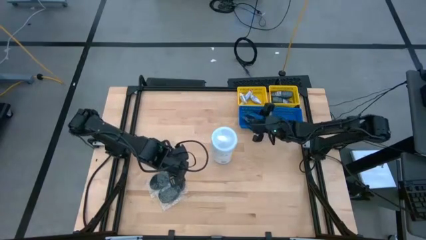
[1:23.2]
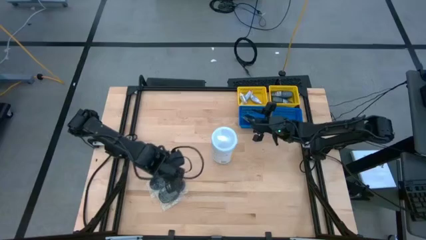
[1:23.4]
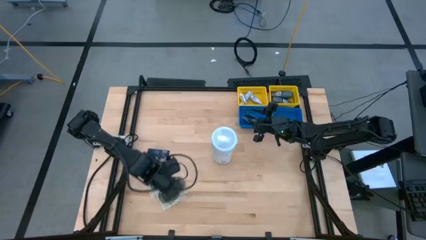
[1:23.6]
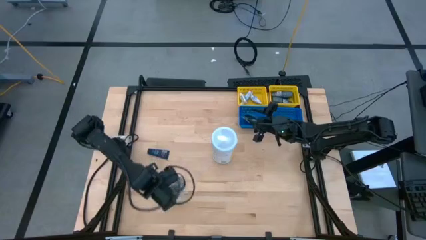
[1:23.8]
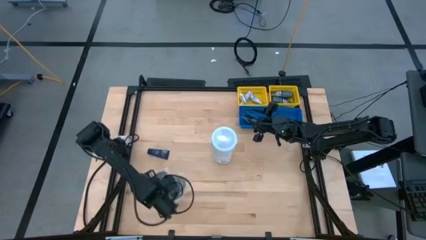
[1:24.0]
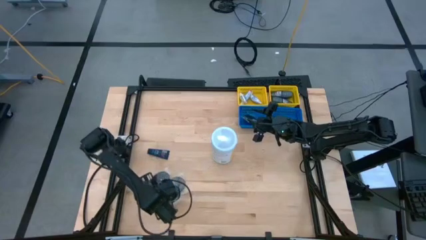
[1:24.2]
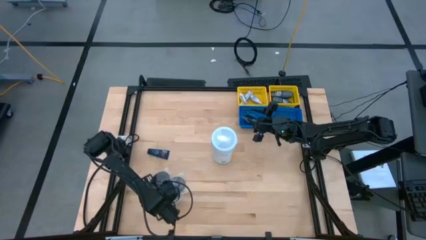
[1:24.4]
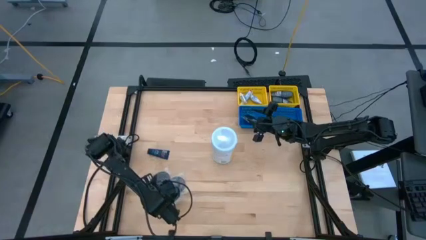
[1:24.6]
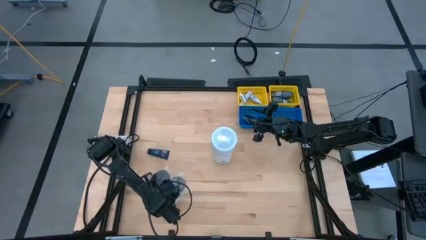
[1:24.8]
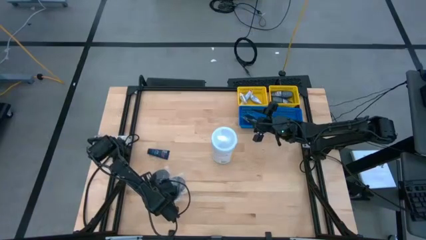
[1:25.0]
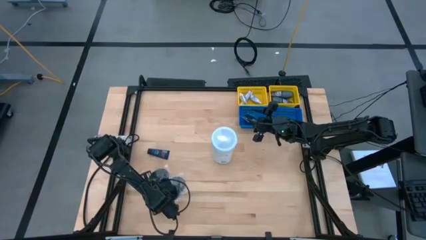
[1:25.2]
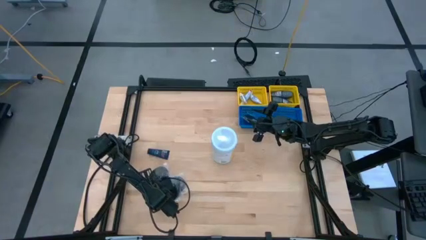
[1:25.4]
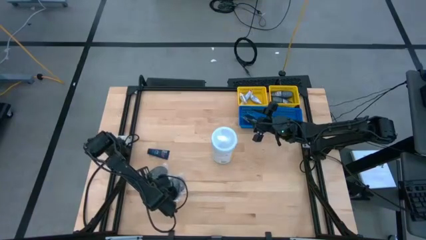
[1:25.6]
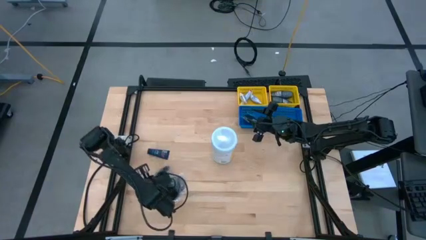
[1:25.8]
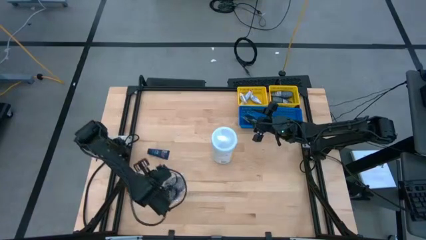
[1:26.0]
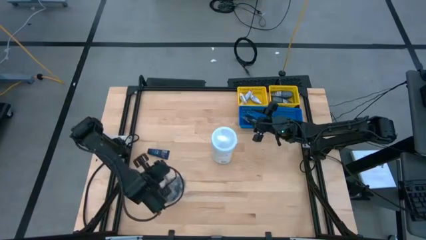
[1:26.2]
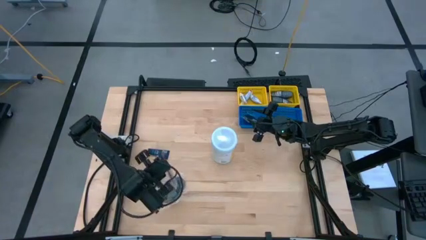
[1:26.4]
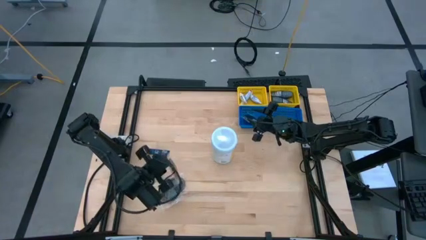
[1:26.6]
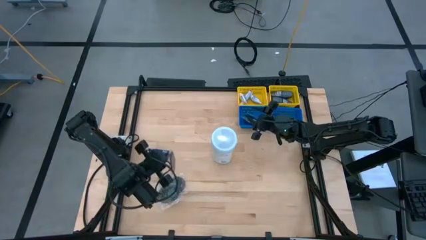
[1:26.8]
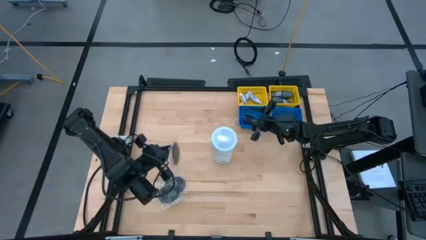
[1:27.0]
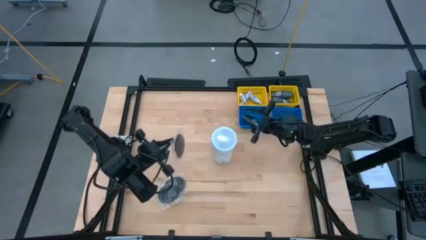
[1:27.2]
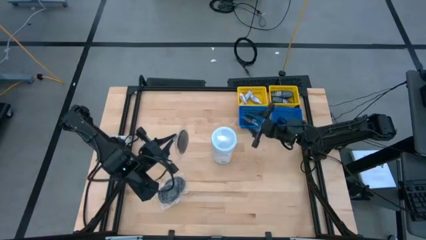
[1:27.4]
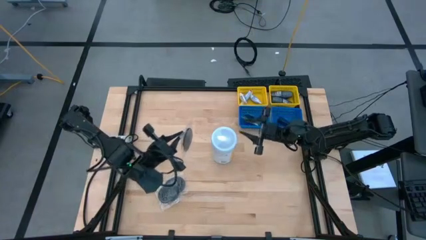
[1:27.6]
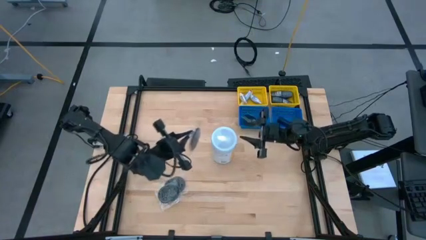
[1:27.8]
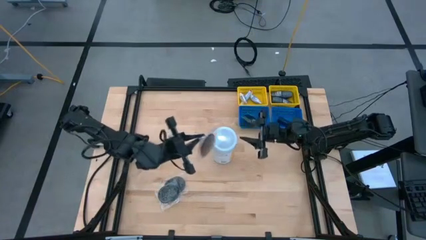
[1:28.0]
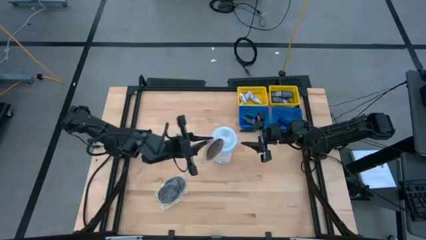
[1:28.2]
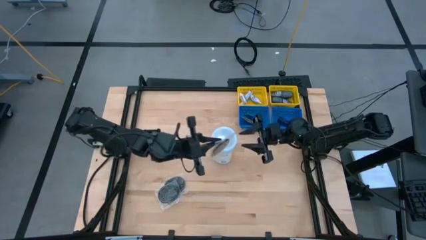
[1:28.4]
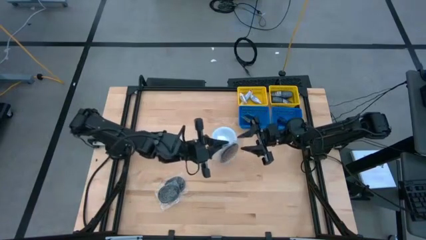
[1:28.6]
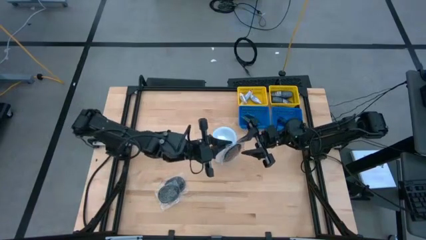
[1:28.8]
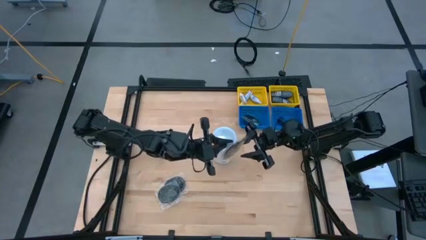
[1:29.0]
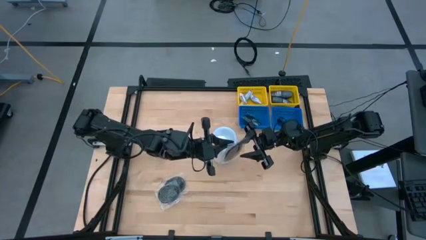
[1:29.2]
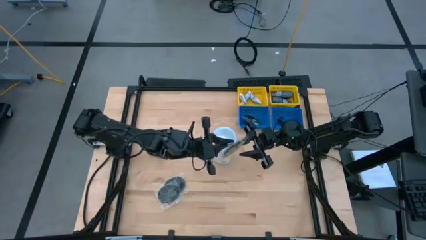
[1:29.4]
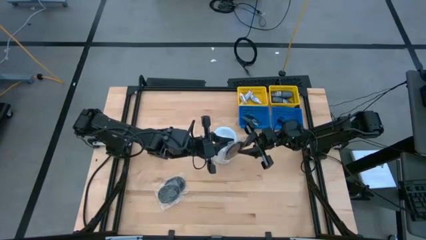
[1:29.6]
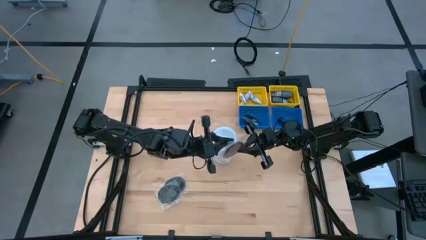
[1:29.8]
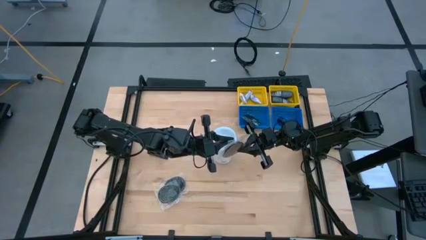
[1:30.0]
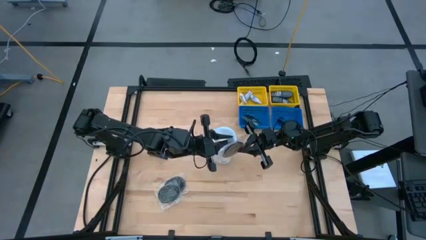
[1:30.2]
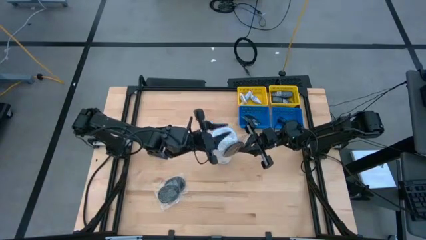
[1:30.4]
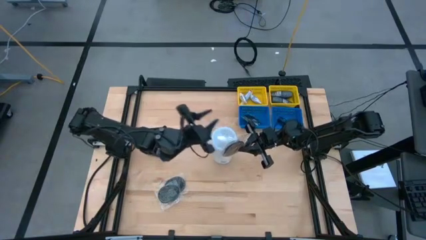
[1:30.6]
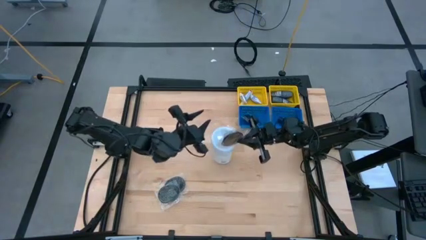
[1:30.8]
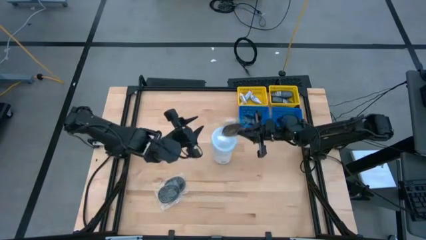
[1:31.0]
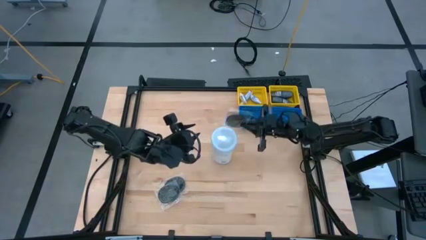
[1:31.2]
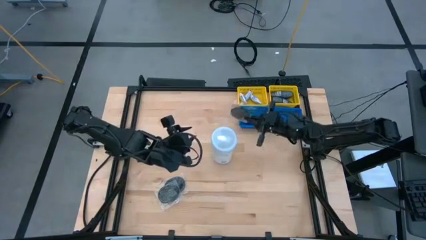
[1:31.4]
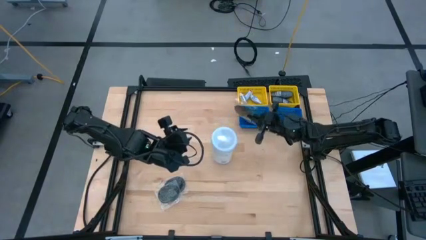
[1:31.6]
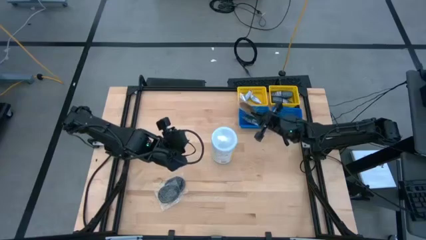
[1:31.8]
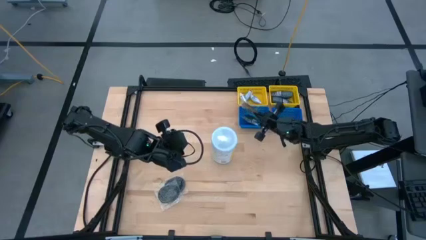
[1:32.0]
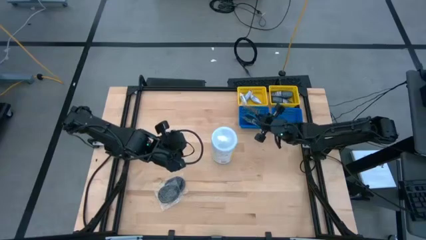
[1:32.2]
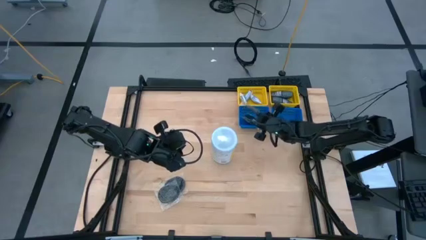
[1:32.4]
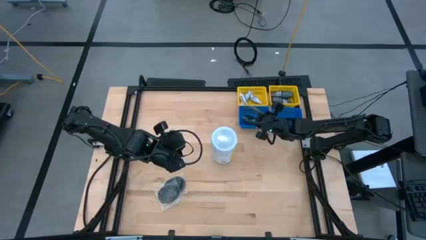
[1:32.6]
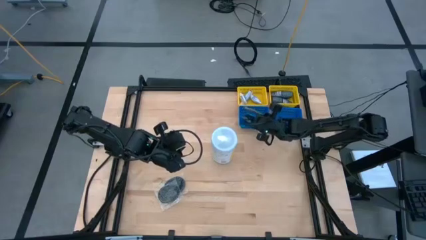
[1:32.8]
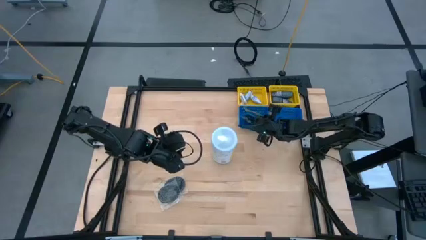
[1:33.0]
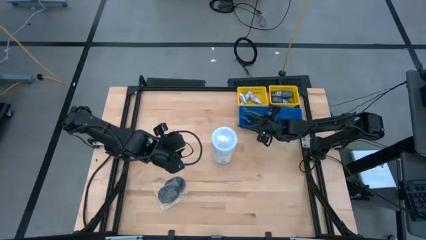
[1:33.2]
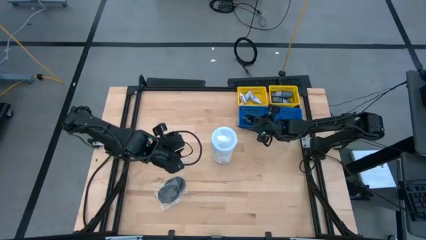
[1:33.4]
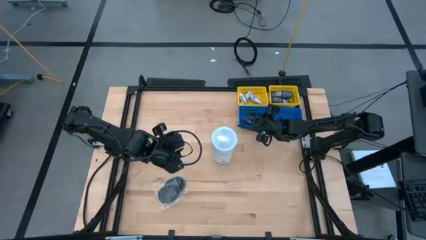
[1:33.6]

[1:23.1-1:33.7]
Task: Pick & Place Travel size toiletries
Put the black hair brush into the left blue bin

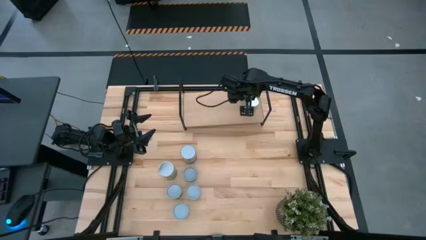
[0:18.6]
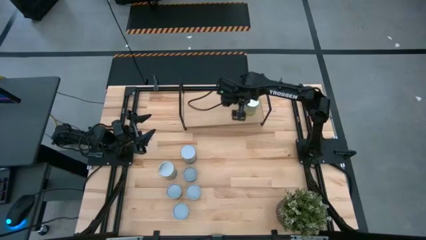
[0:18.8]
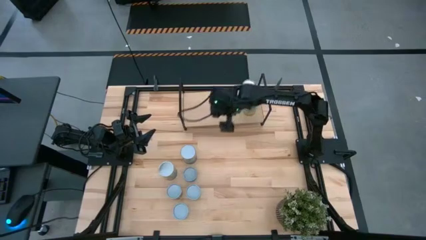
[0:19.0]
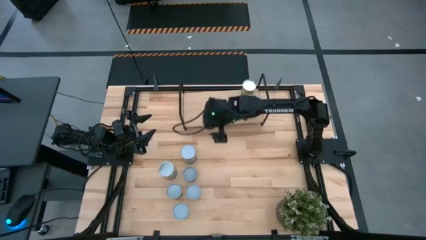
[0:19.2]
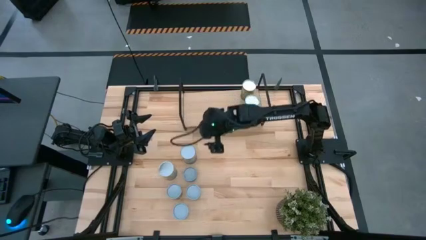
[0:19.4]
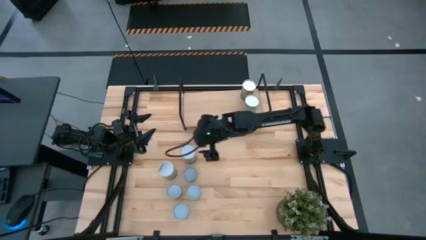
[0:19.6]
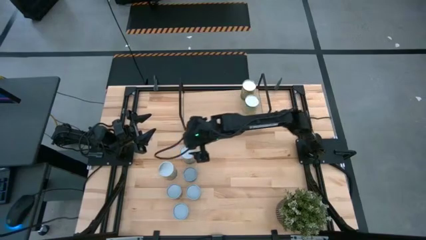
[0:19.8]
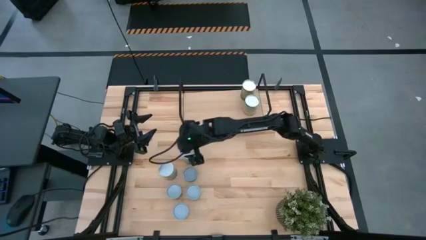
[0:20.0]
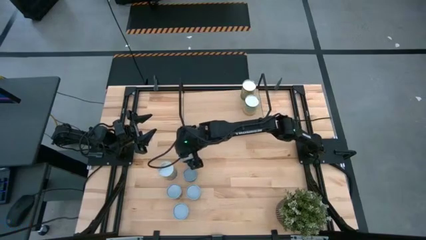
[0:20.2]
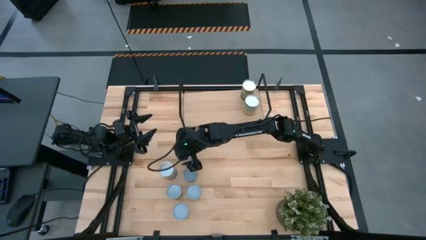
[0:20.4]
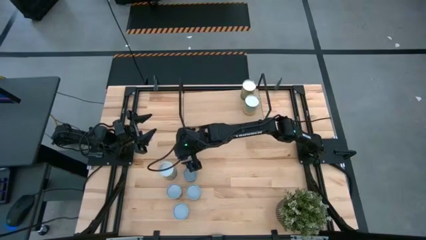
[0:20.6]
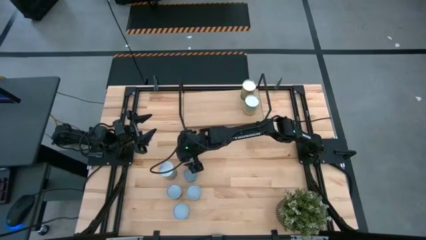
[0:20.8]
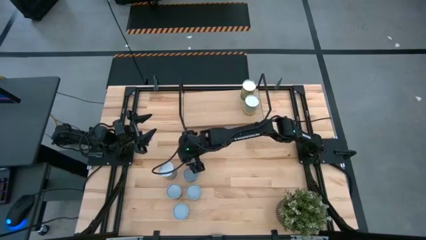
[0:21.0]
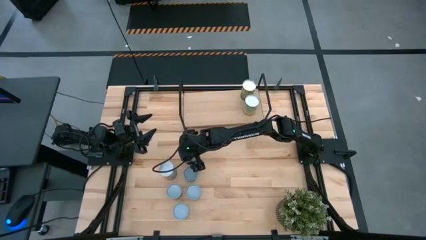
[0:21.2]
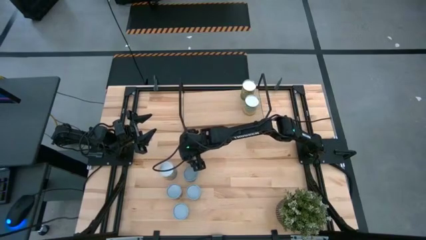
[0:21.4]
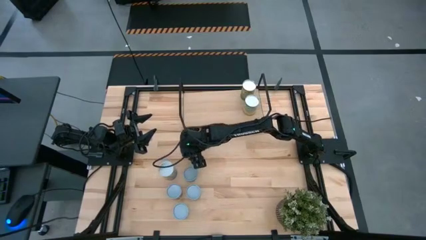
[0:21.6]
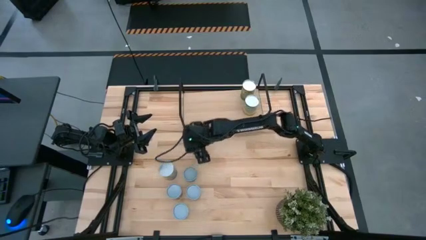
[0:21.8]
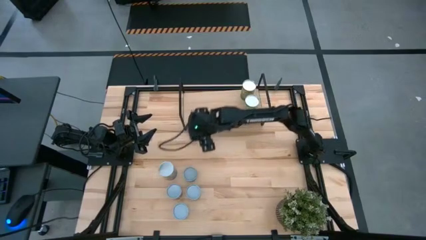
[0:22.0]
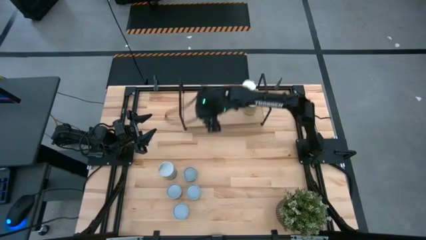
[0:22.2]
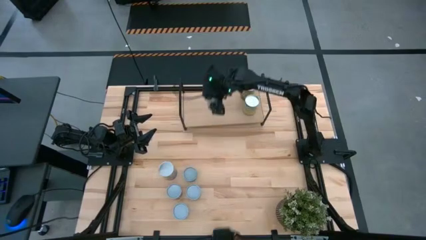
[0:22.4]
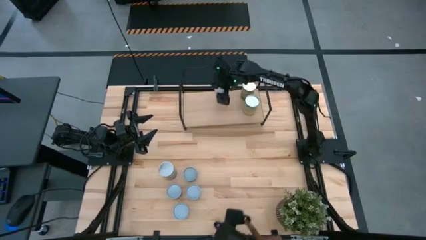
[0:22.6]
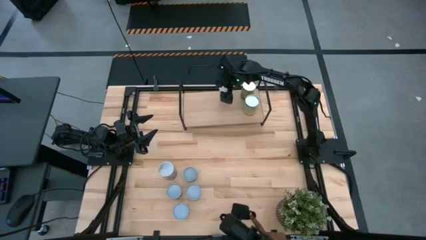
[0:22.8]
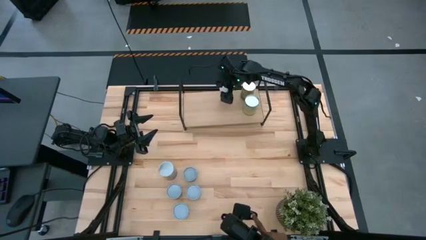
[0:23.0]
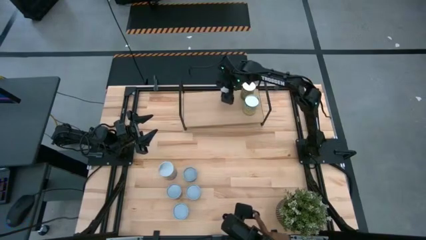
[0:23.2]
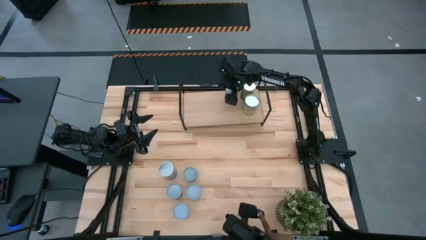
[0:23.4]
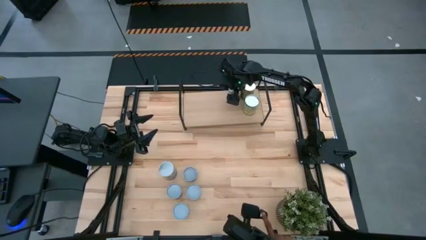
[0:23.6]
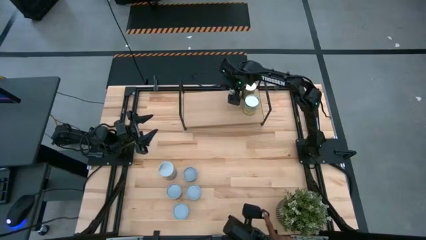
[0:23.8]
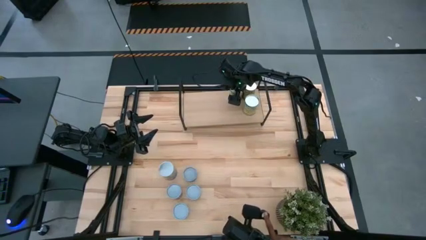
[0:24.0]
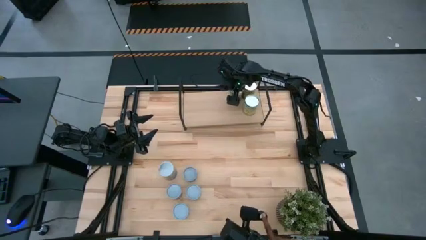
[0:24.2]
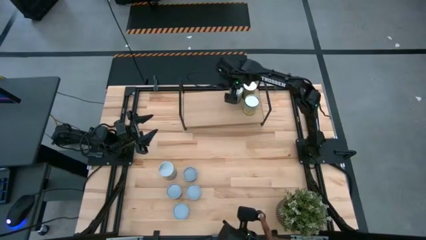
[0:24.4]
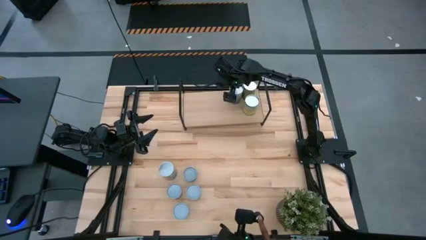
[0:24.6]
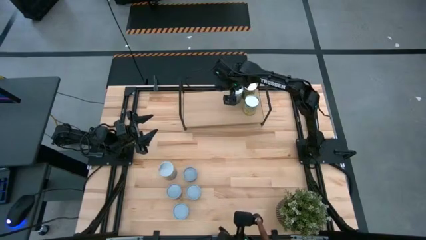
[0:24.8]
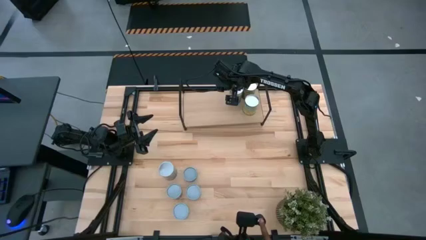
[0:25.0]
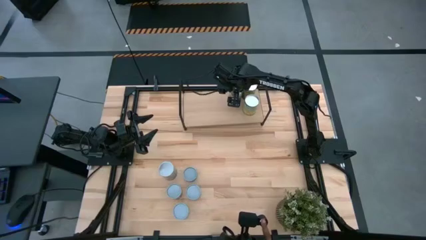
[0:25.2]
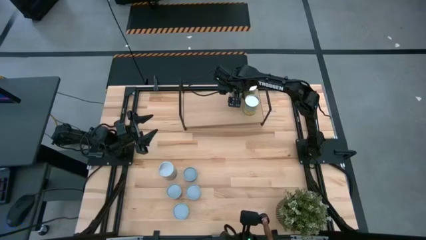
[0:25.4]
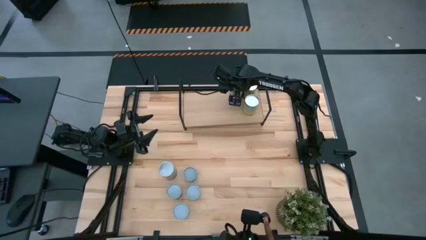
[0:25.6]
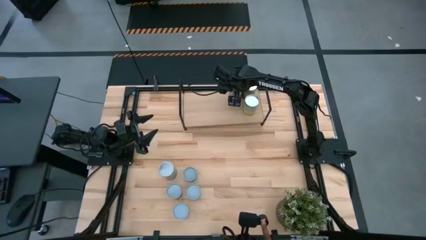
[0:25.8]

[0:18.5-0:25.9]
Task: Pick and place cans onto a shelf
Put the canned peas on the shelf
